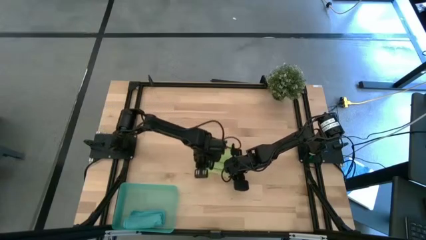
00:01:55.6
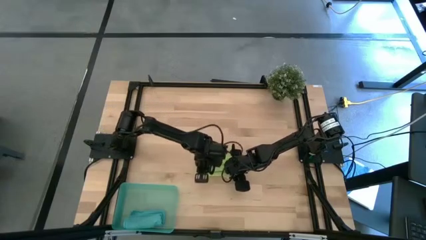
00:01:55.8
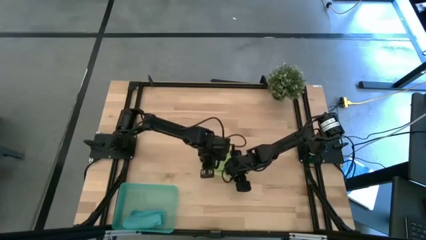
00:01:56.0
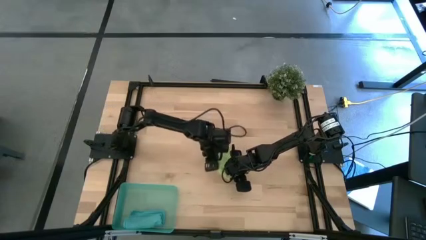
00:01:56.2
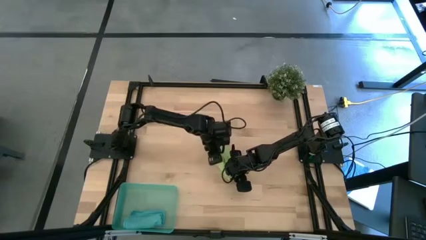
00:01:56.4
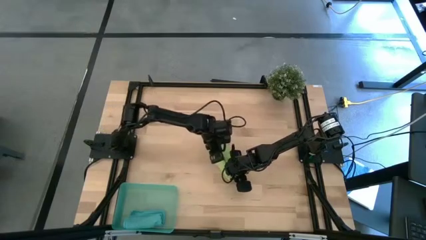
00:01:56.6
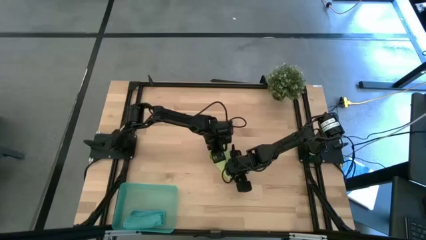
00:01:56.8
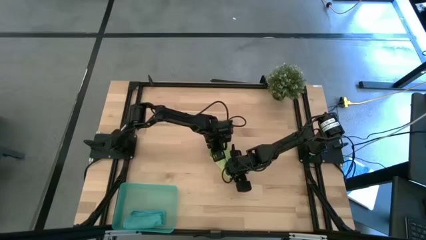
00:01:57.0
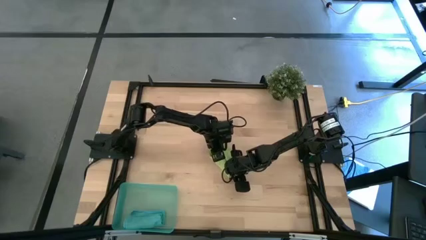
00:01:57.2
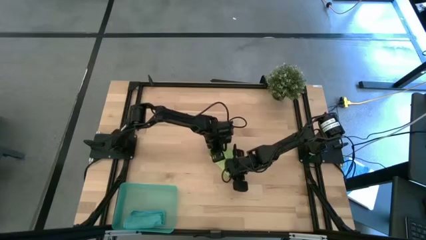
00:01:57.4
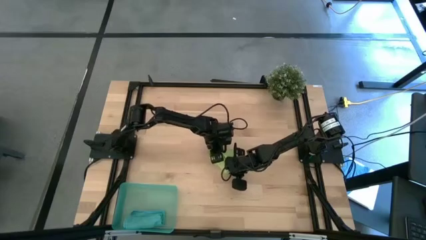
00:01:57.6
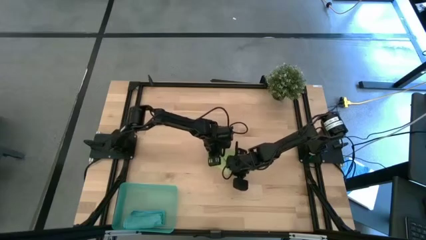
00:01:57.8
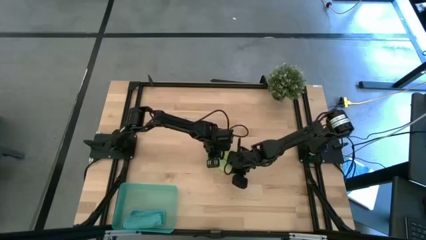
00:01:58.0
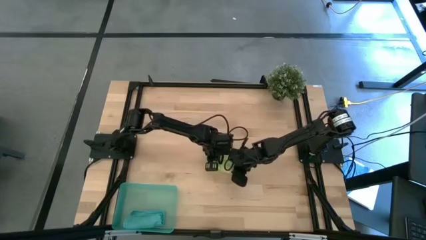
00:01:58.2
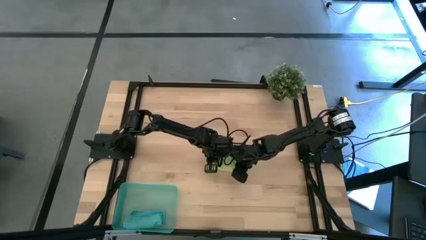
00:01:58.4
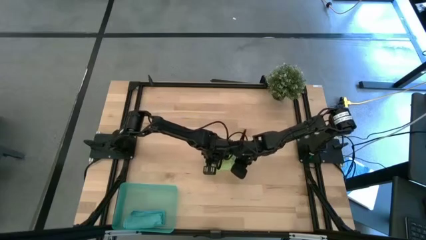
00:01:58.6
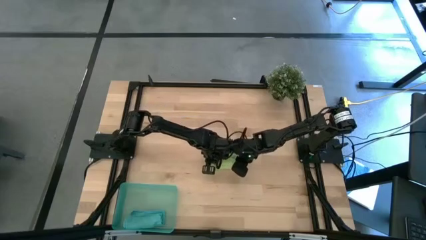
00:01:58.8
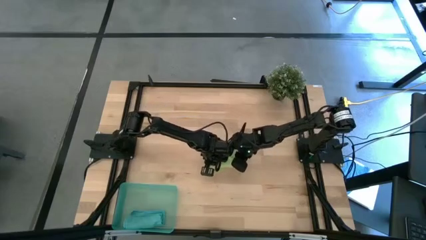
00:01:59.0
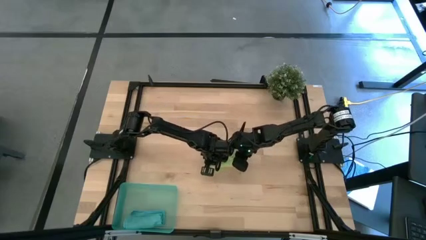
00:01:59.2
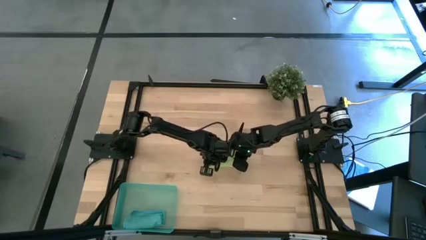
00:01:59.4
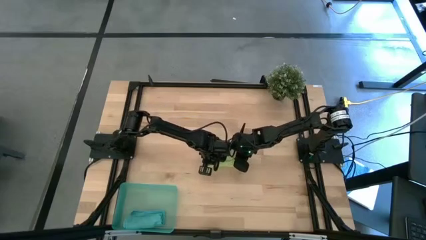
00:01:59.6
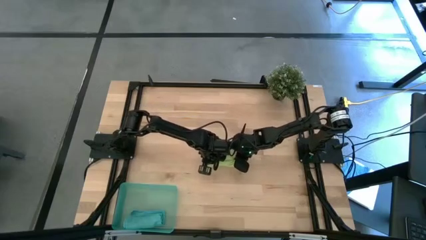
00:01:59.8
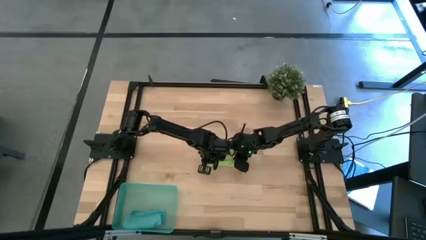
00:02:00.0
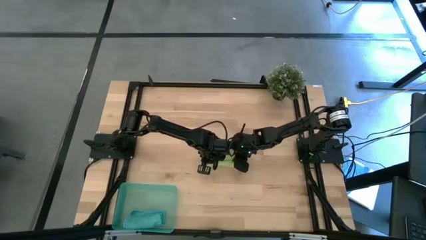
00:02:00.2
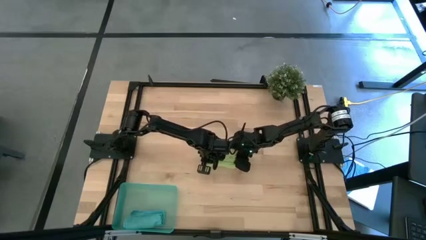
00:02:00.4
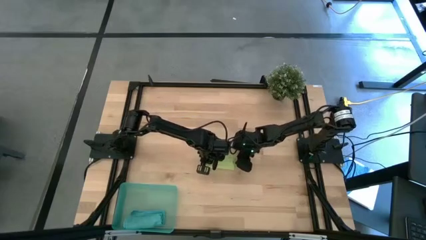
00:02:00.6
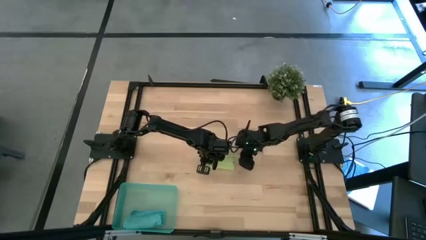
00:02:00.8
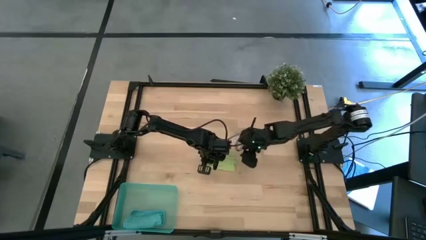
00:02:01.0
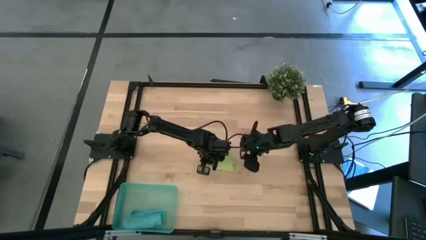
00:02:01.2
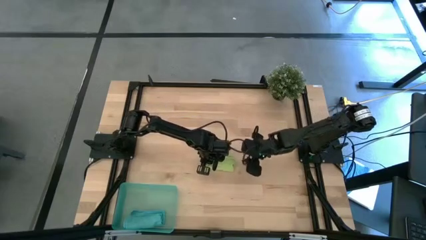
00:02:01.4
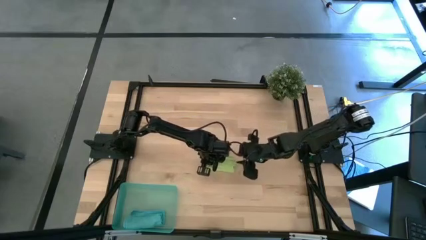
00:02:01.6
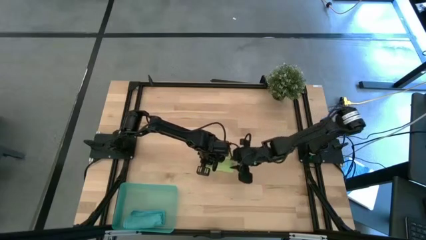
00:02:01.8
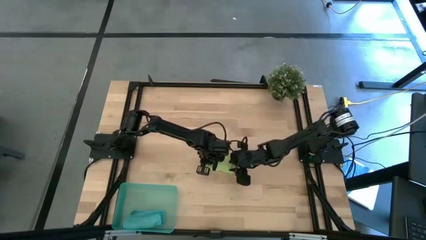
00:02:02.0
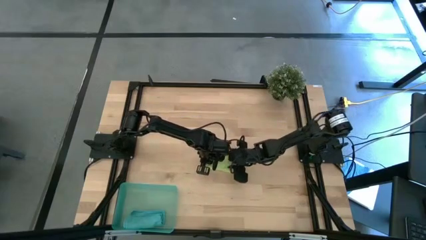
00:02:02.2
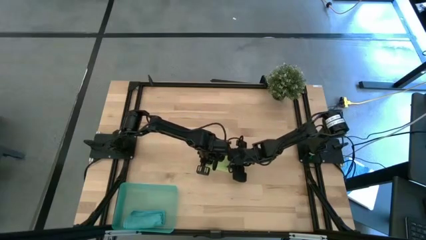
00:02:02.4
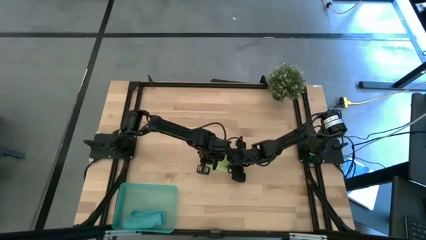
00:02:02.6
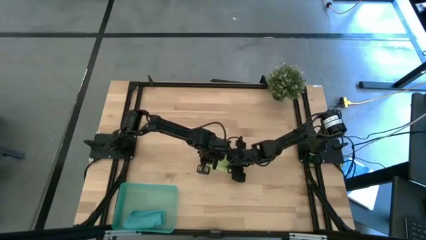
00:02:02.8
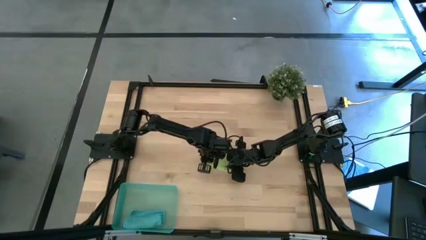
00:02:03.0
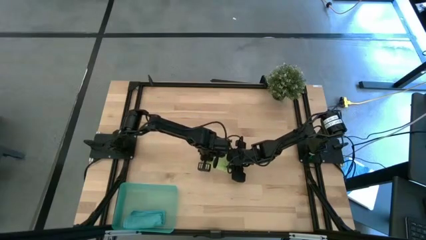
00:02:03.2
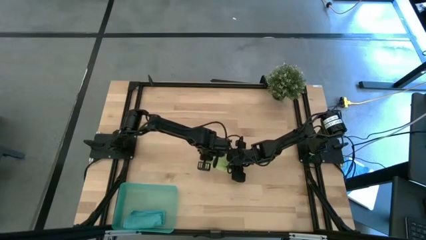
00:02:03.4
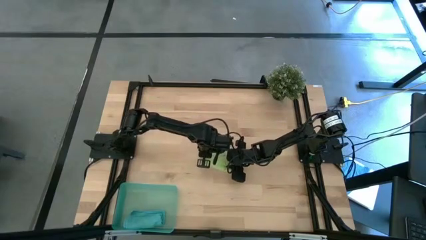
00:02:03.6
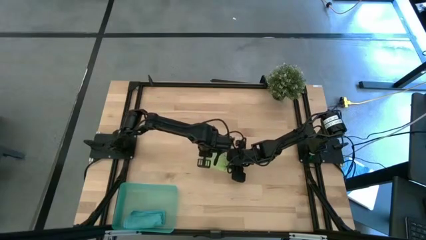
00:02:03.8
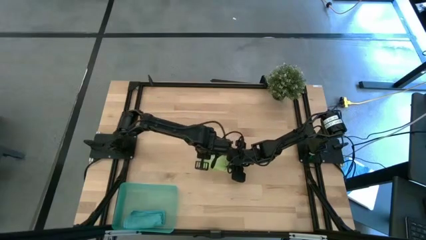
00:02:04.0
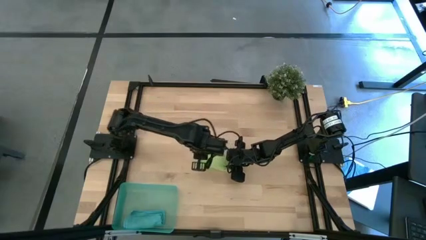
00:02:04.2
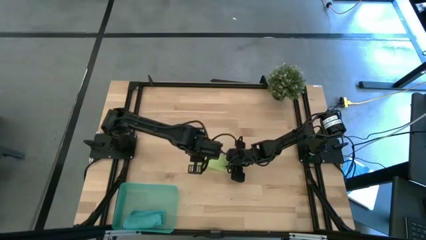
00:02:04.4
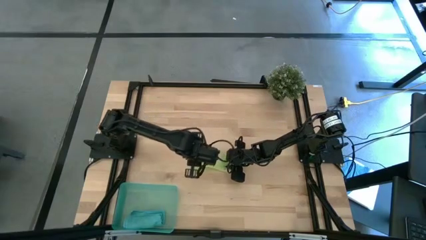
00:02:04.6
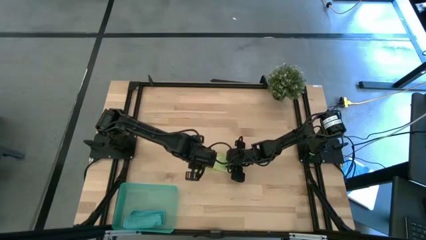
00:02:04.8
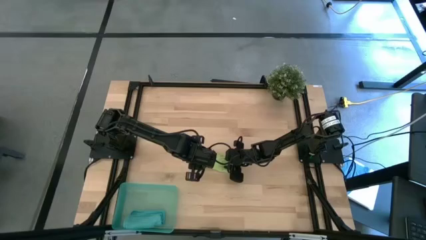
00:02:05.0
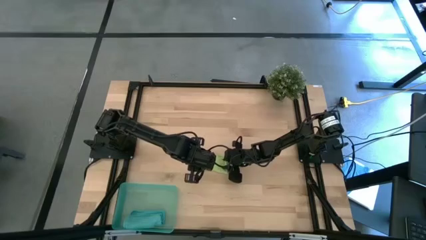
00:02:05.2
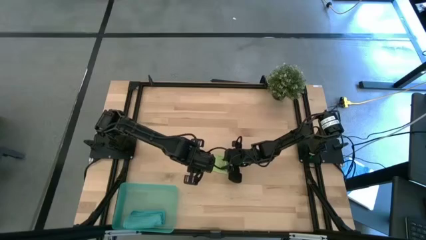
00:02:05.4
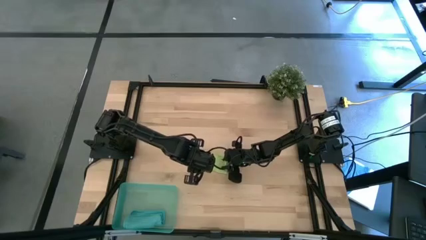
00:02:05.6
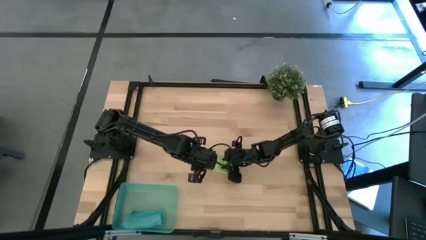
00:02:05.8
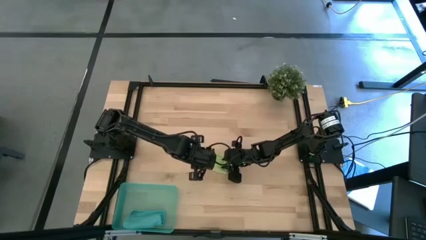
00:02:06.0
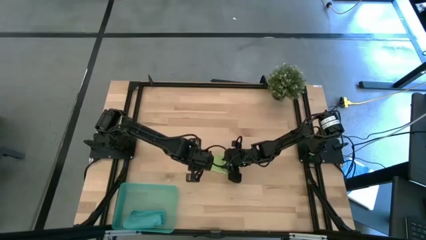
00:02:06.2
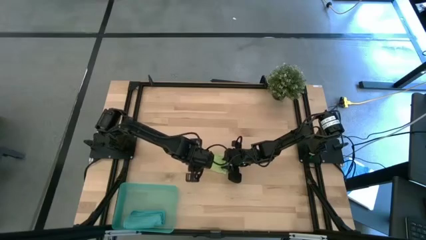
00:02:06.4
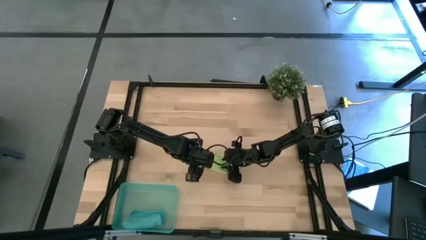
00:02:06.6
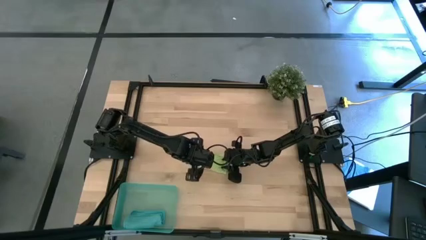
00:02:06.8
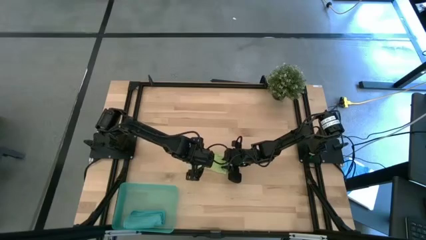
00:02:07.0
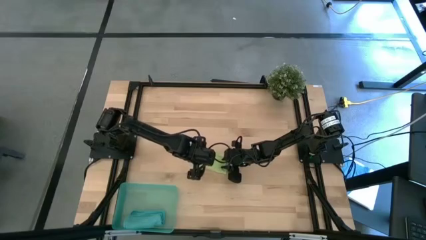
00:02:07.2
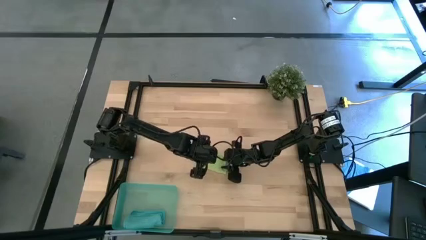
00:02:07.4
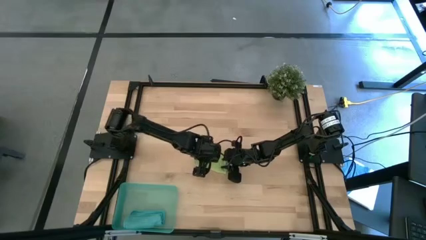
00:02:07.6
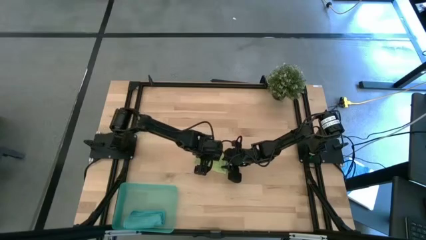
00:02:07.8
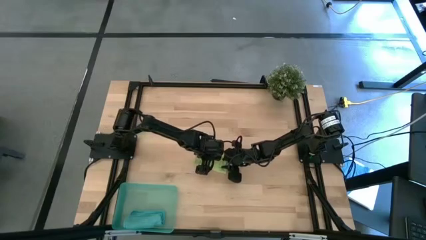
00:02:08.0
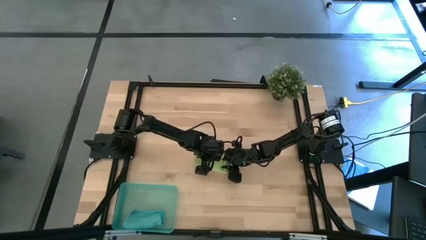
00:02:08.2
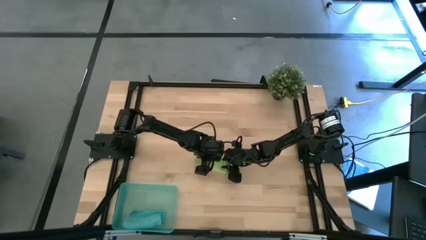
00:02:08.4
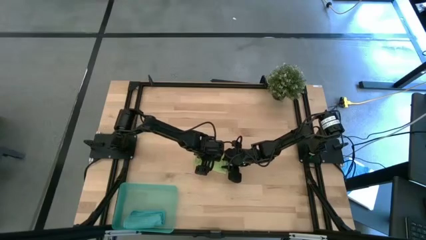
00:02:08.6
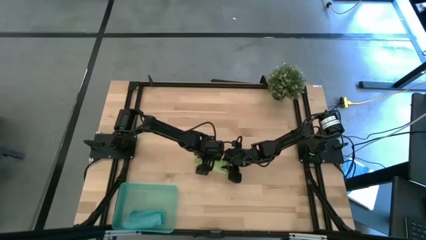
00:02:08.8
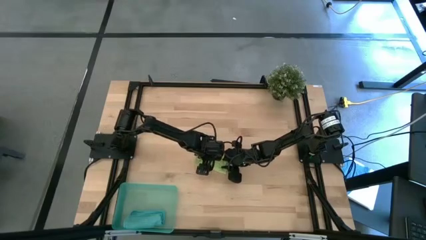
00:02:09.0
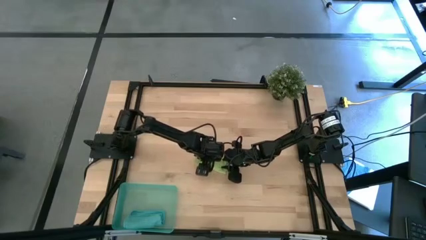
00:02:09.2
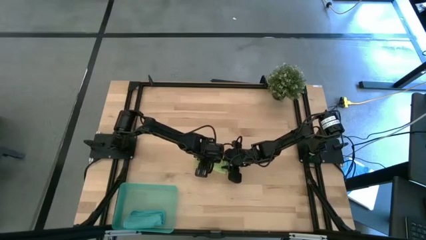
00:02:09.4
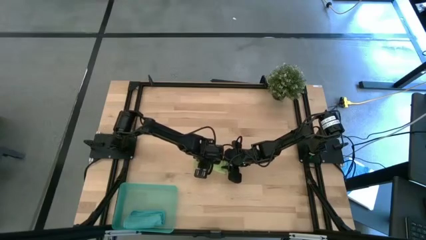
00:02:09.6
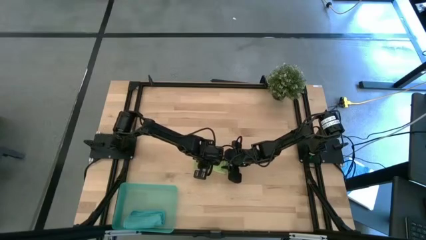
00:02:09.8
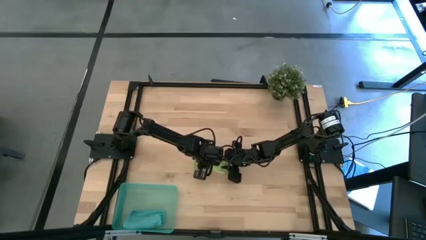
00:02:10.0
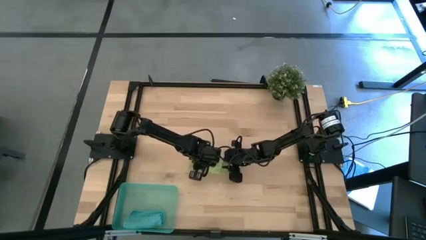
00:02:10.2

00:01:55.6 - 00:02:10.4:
Task: Roll microfiber towels into tight, uniform cylinder then place into a basket
Roll the yellow green microfiber towel
